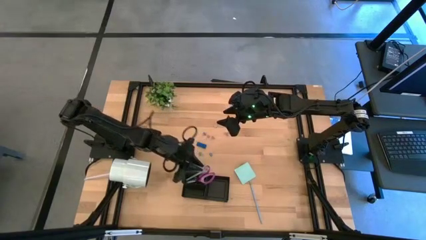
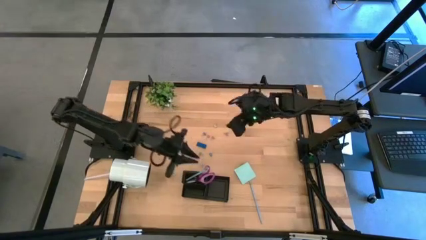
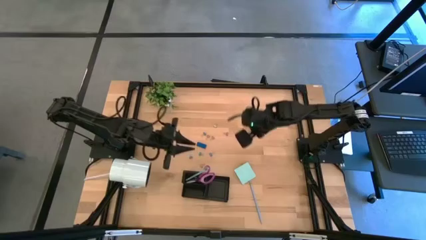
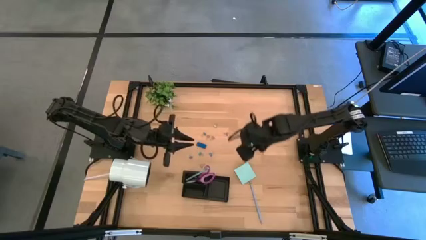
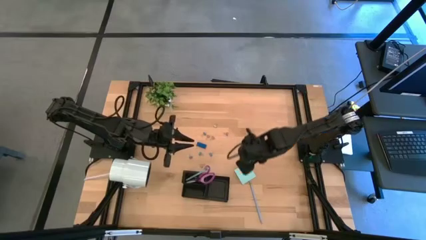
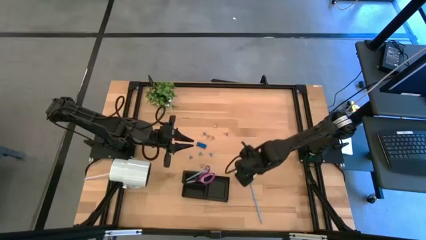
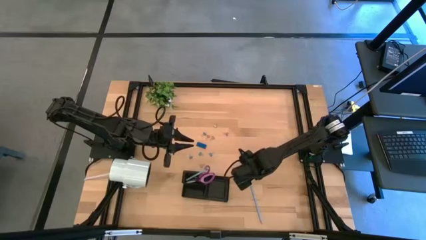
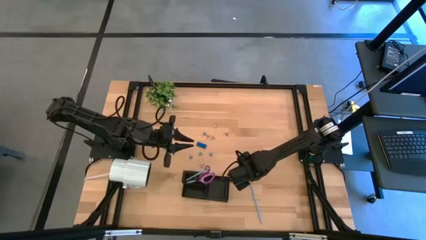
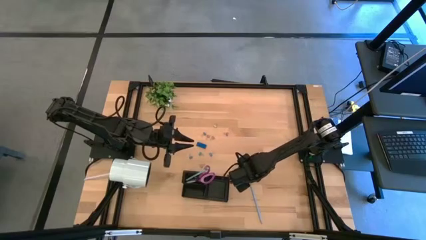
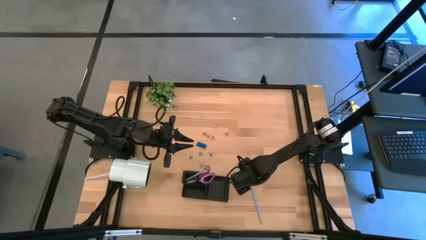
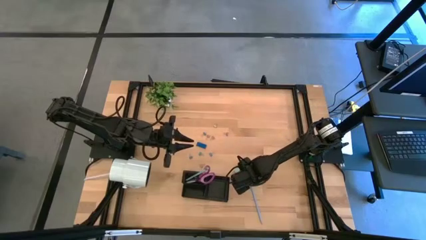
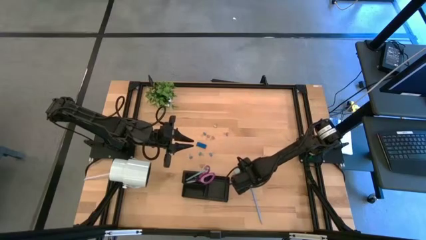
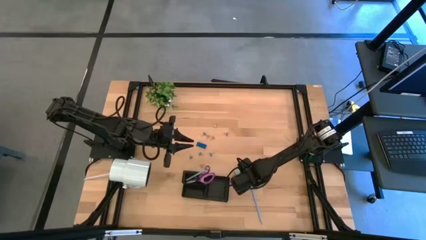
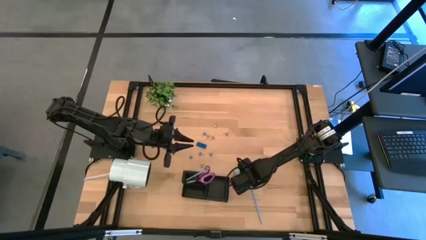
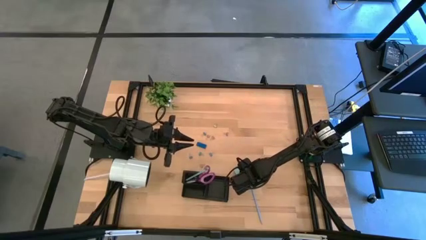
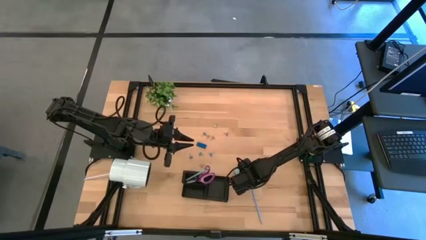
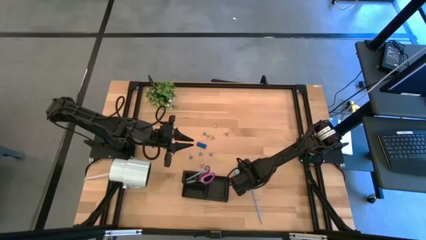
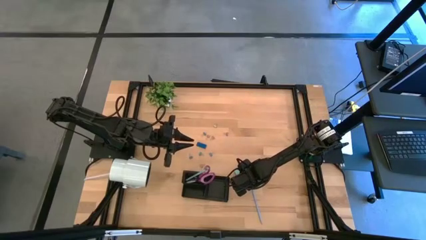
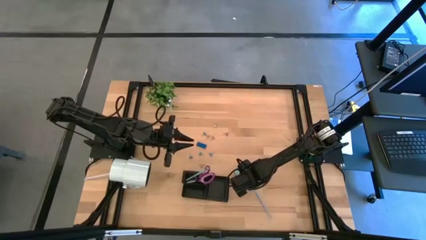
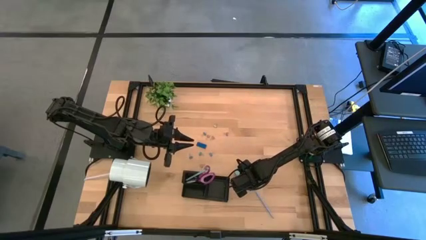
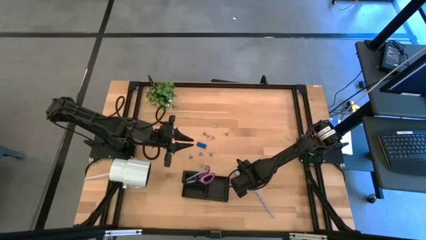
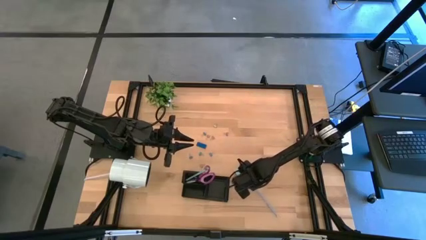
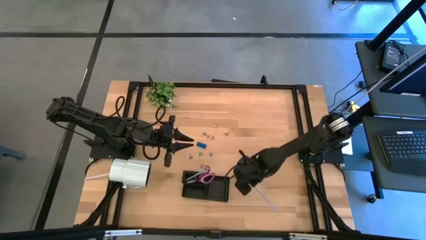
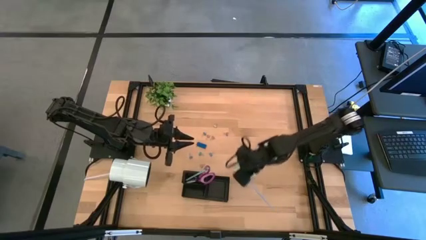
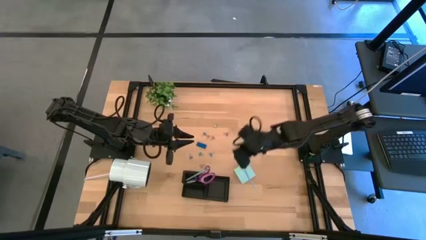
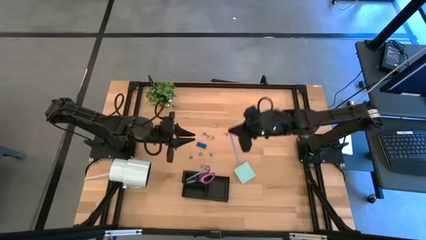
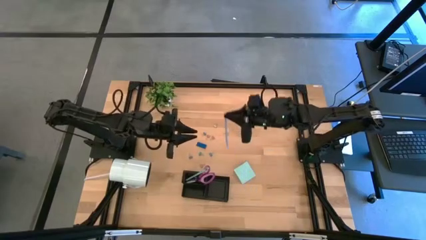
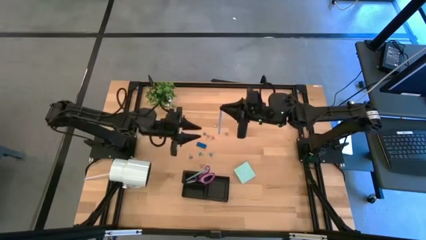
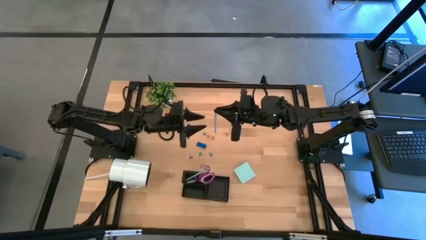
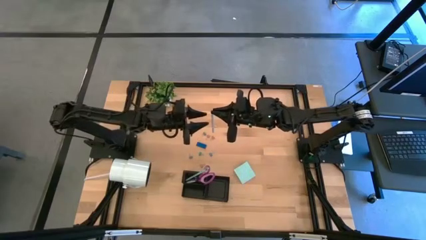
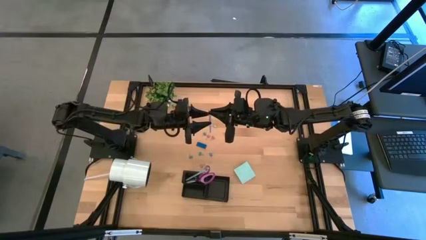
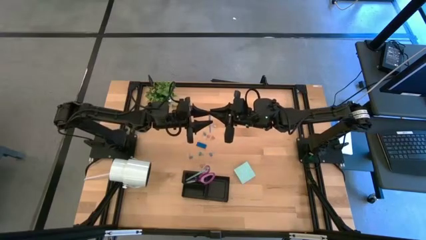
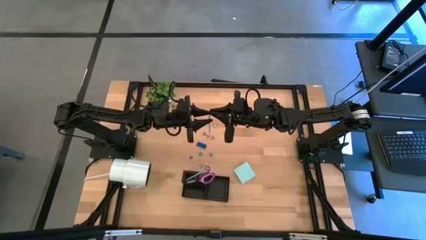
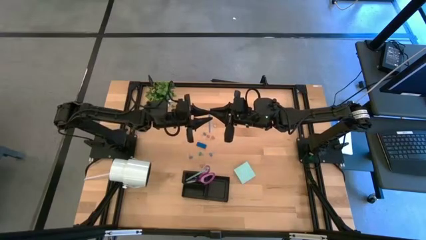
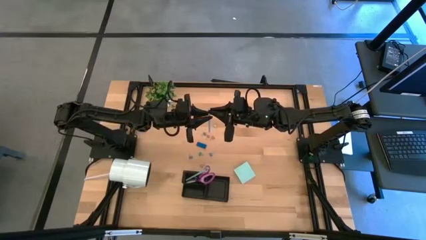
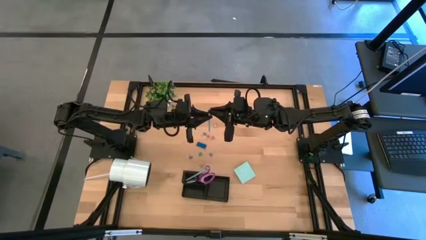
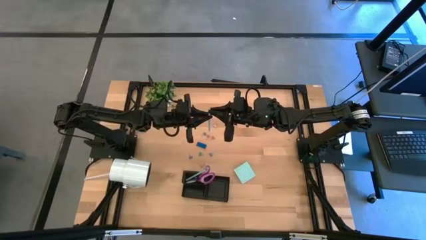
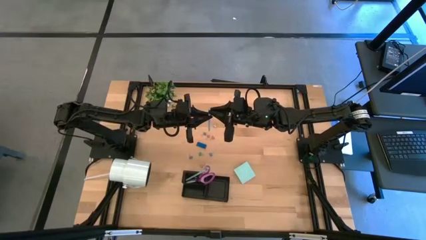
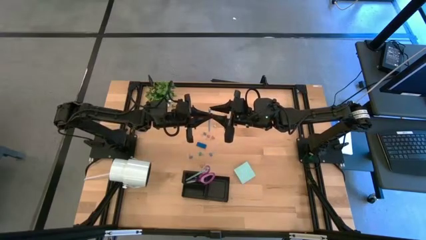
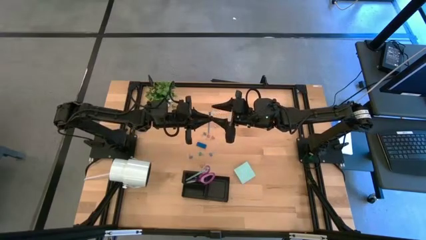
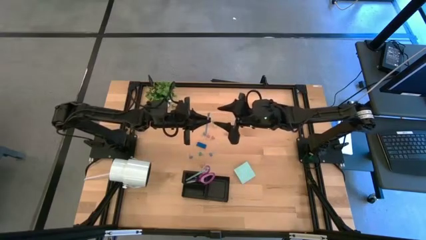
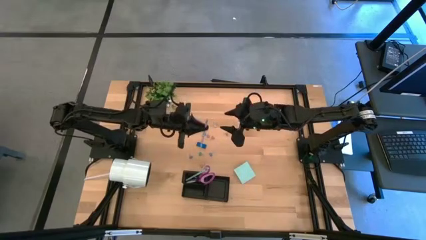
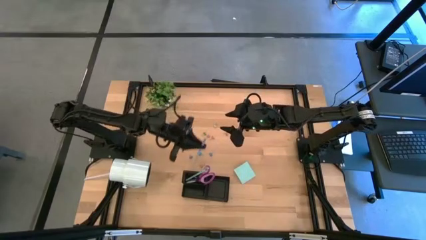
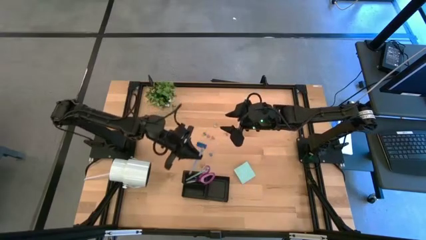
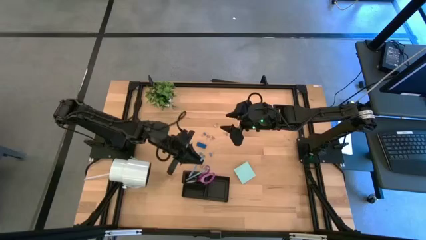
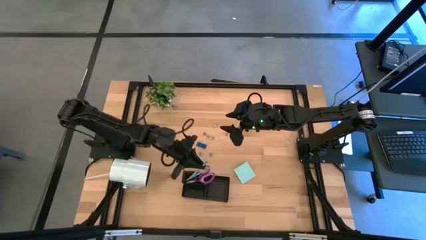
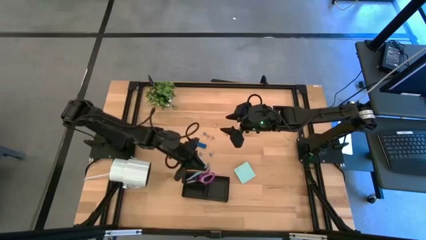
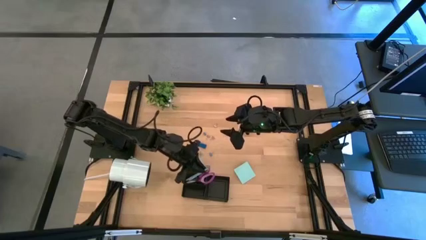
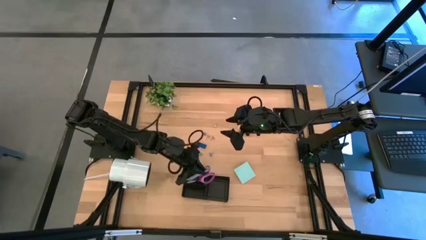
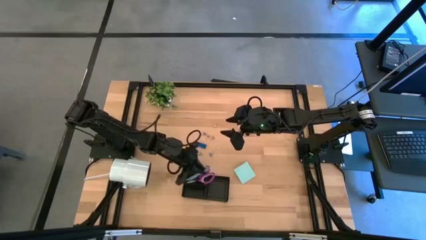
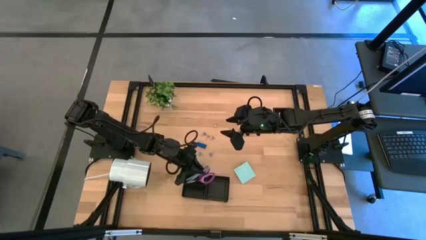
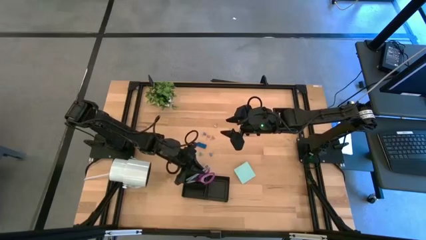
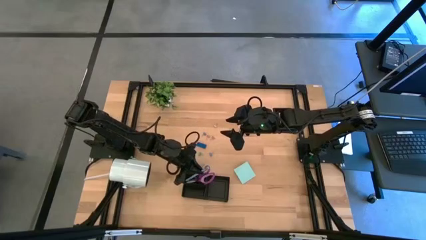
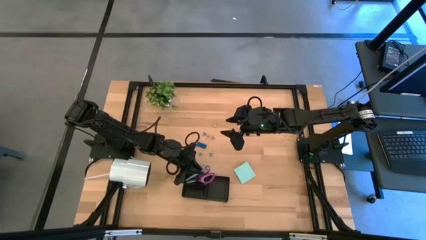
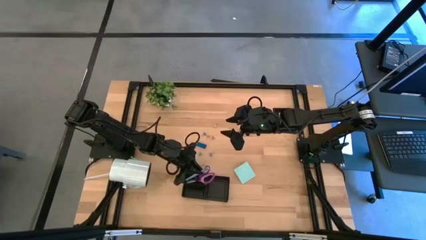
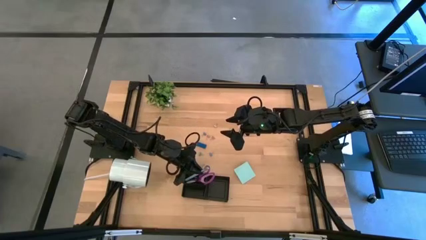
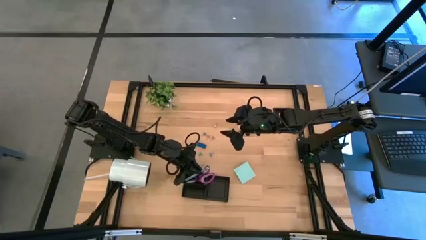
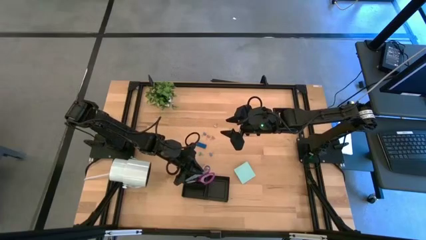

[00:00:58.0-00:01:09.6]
Task: Pick and place office supplies into organizer
Put the light blue pencil into the desk organizer

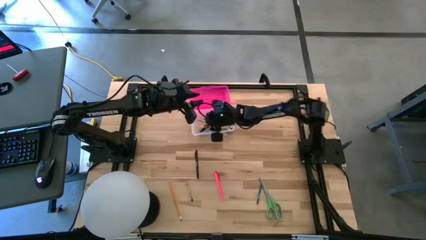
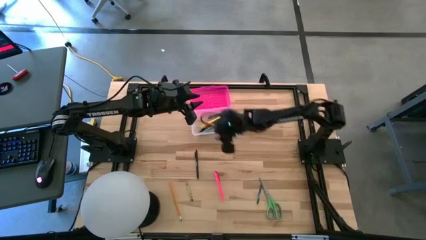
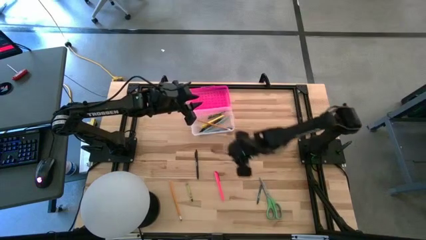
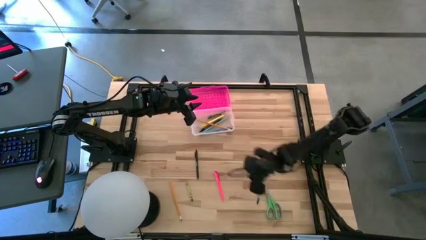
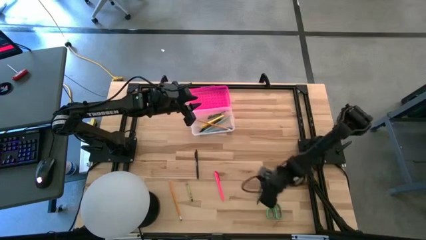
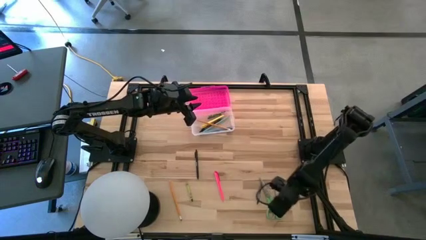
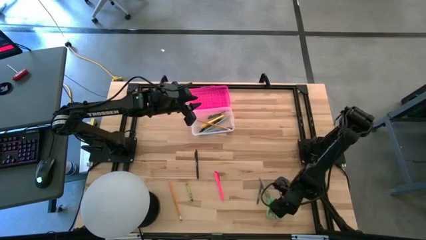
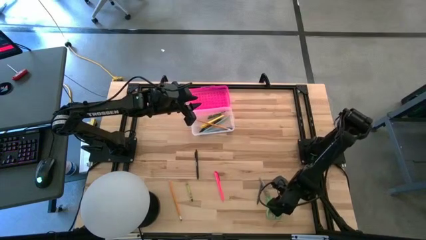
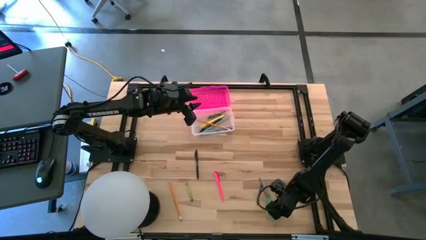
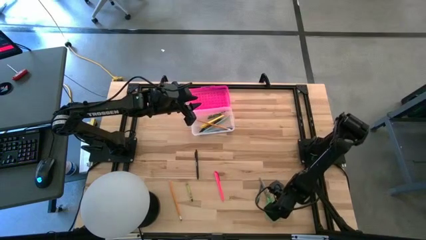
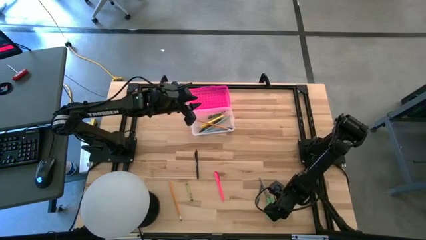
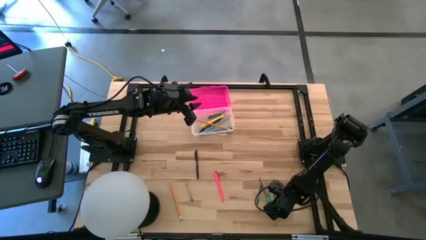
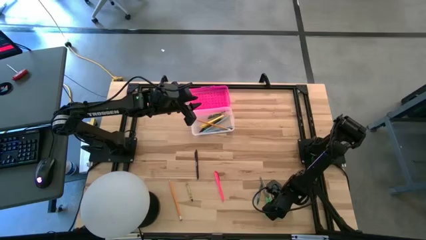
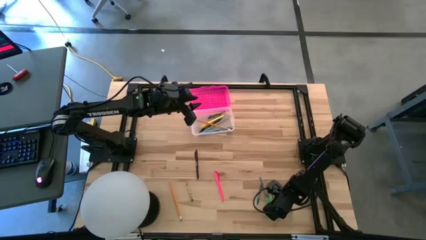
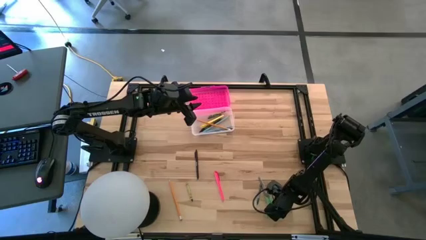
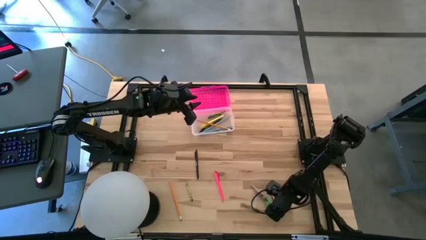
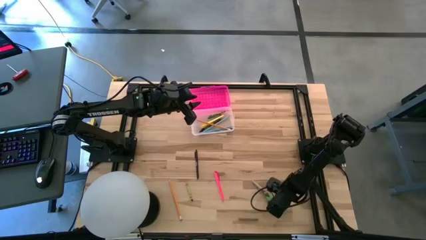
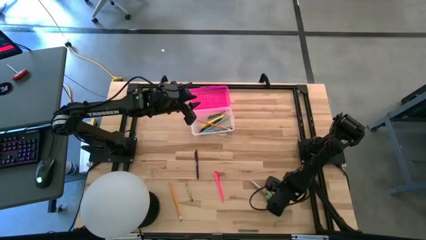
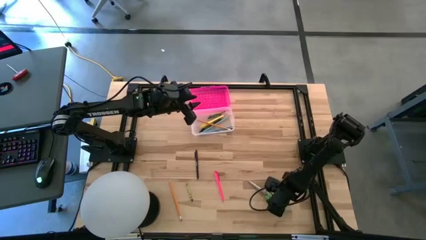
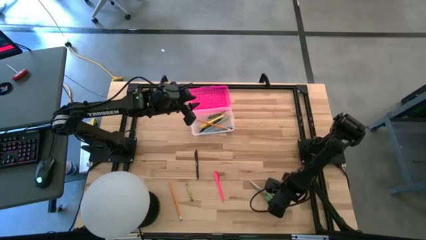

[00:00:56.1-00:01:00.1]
Task: Pick & place school supplies into a supply box
Put the green scissors into the pink supply box

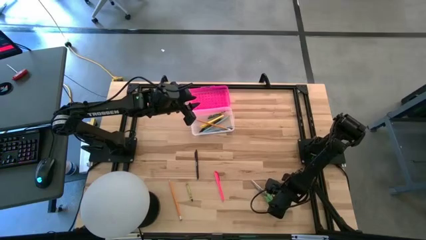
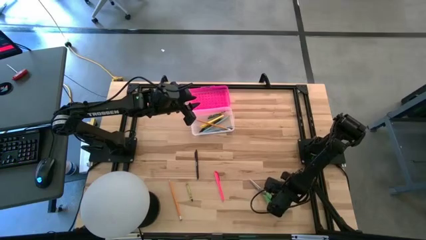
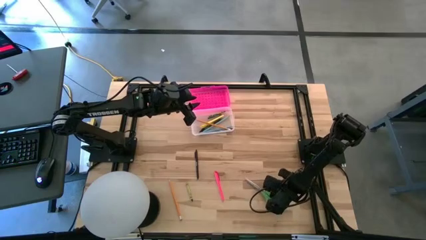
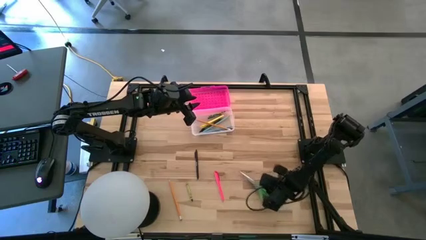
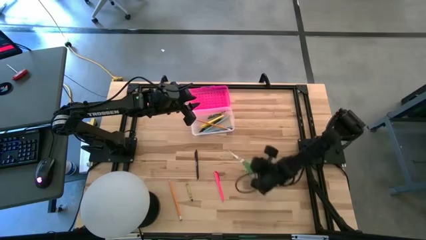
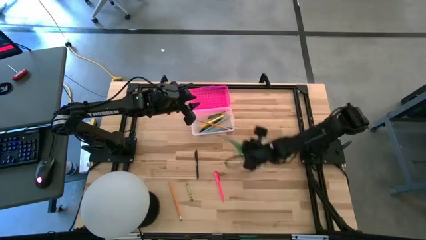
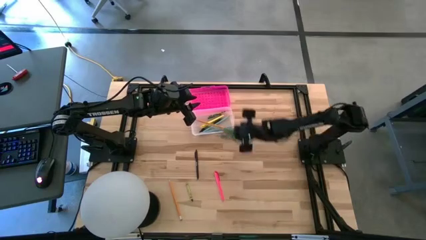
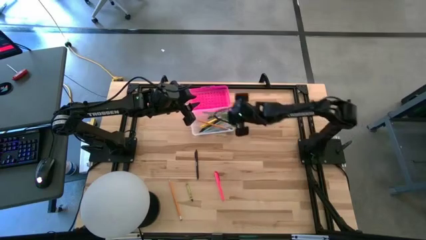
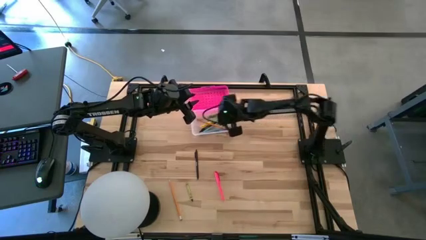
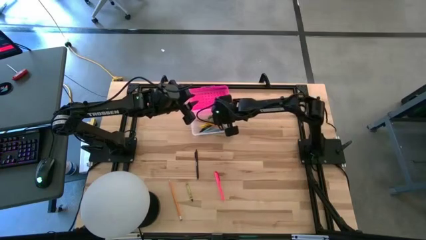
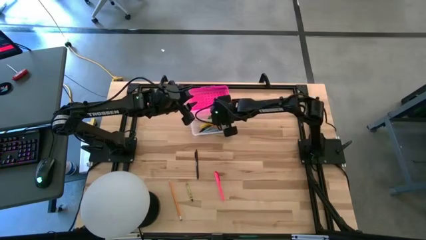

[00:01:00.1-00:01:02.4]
Put the green scissors into the pink supply box
